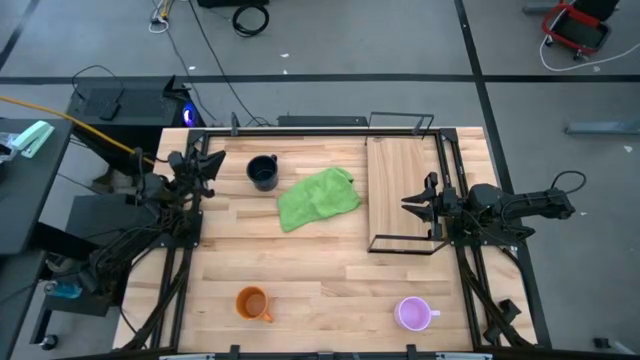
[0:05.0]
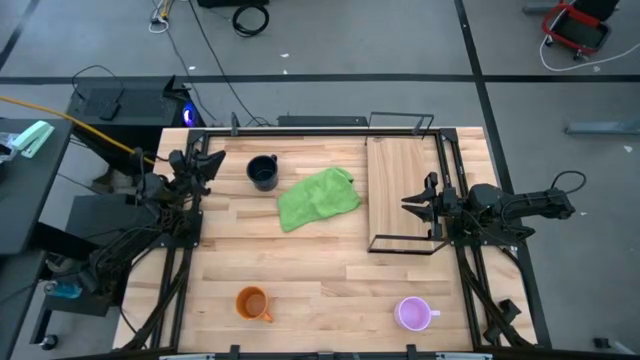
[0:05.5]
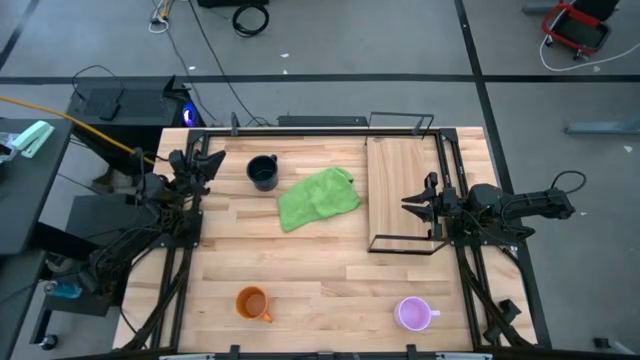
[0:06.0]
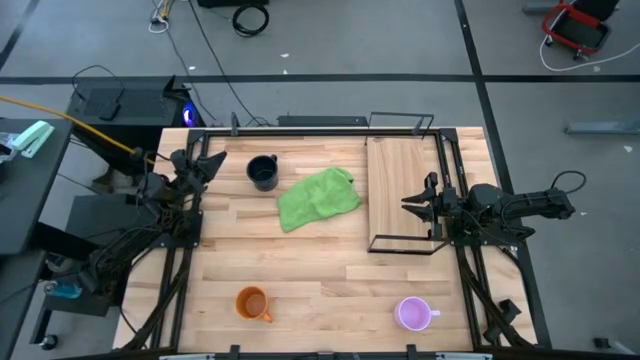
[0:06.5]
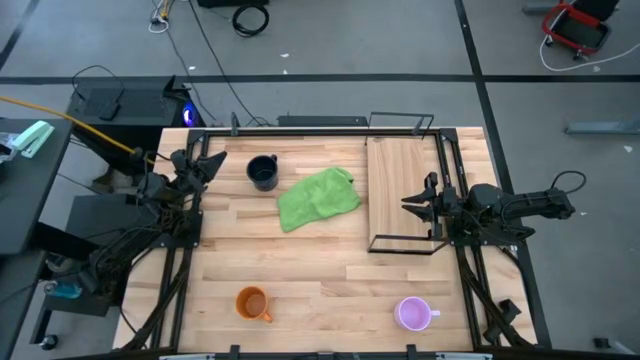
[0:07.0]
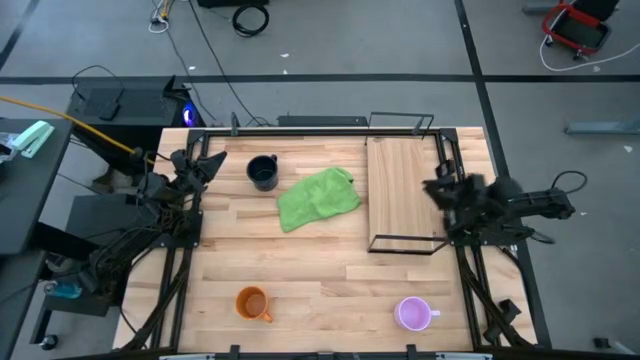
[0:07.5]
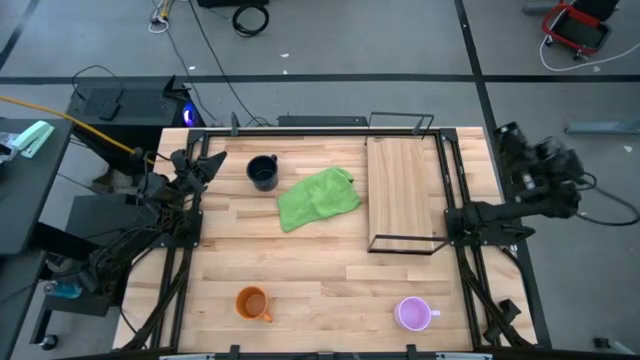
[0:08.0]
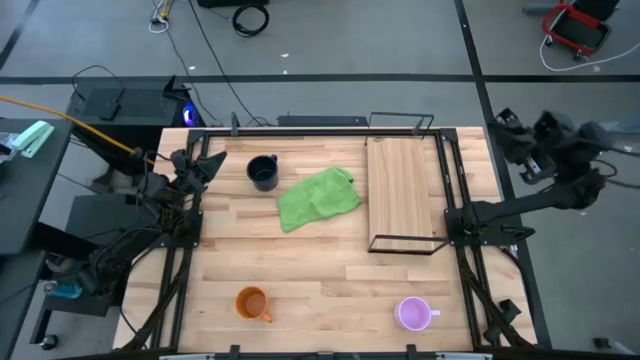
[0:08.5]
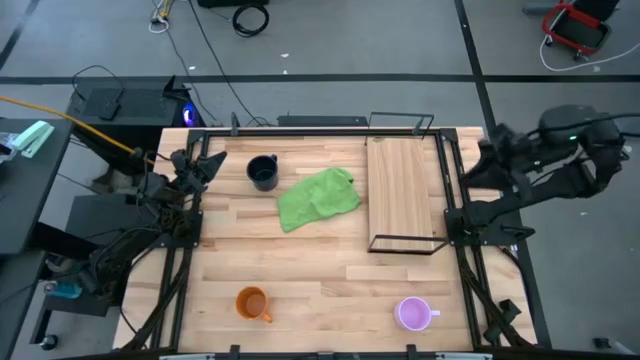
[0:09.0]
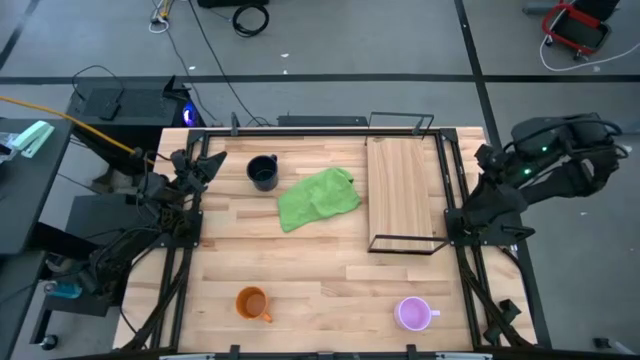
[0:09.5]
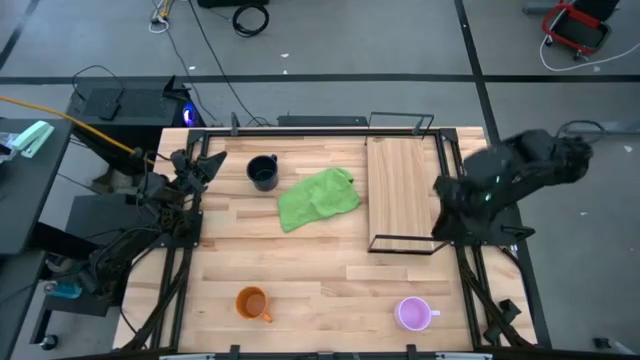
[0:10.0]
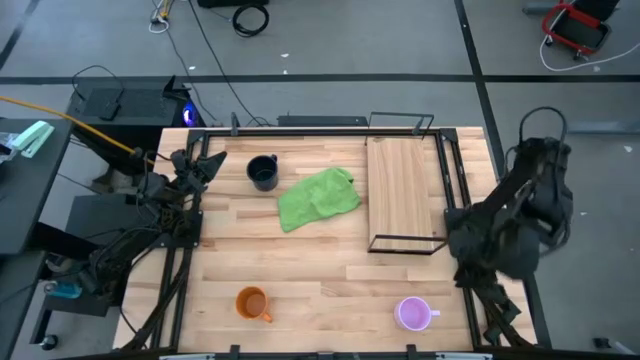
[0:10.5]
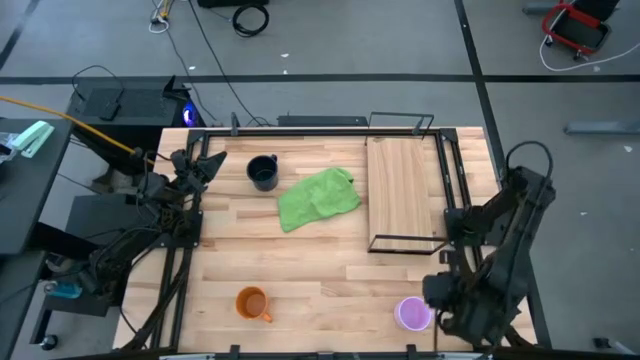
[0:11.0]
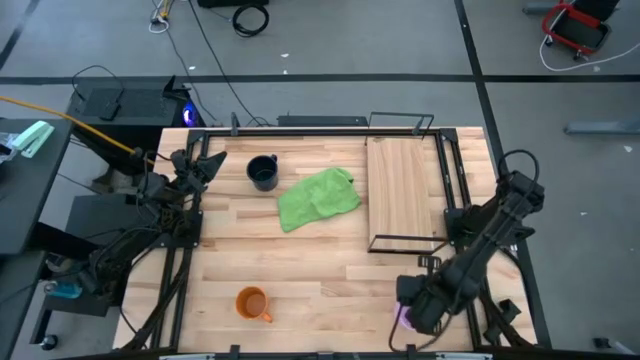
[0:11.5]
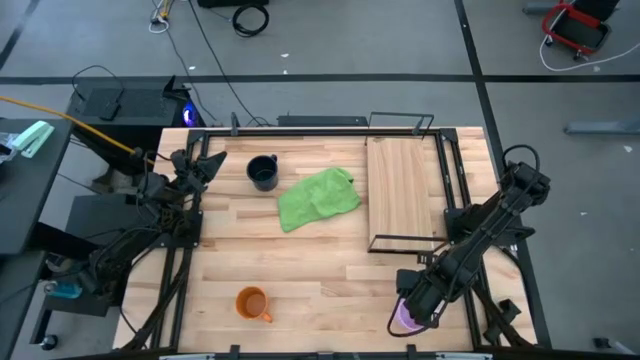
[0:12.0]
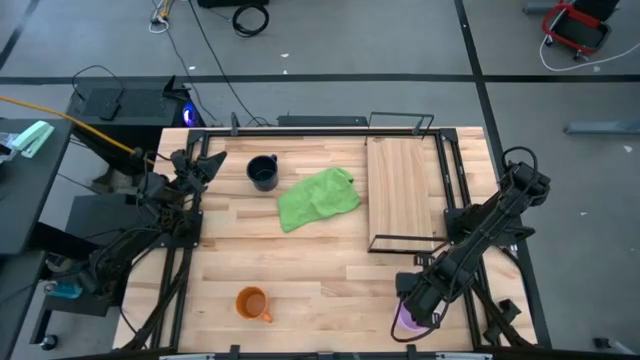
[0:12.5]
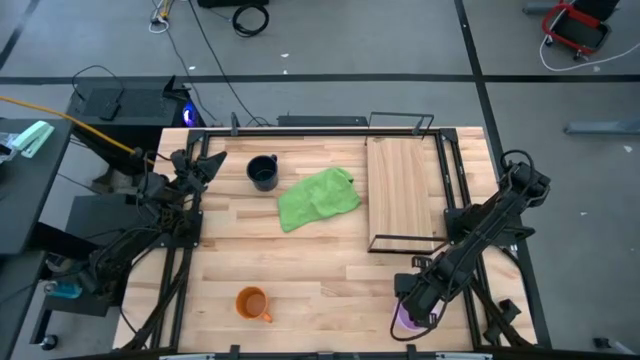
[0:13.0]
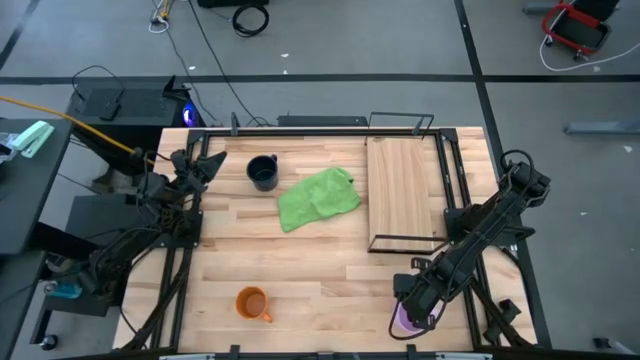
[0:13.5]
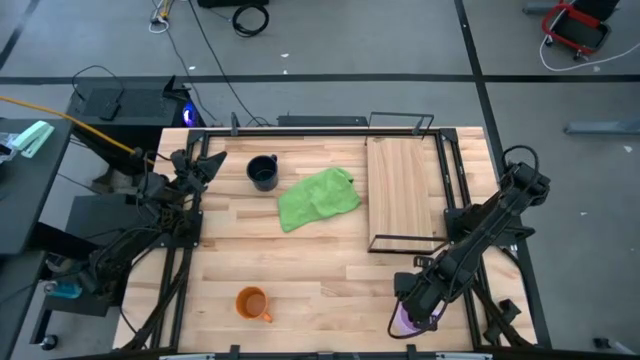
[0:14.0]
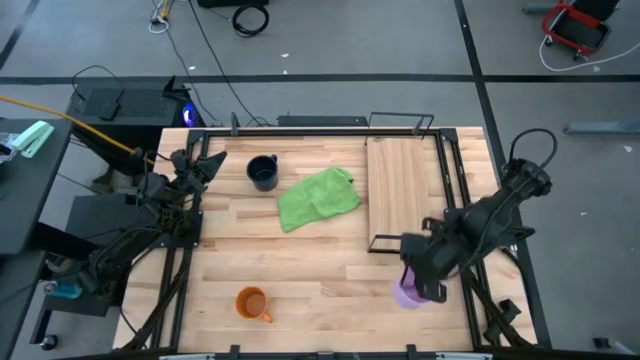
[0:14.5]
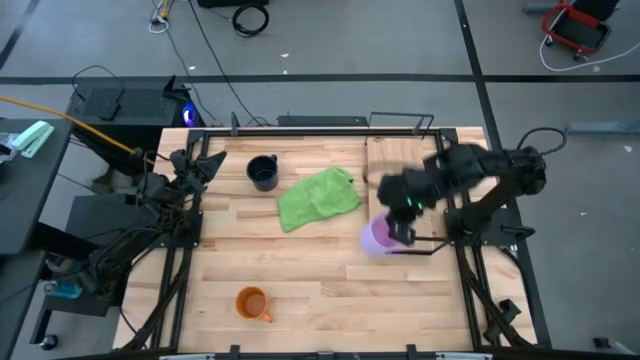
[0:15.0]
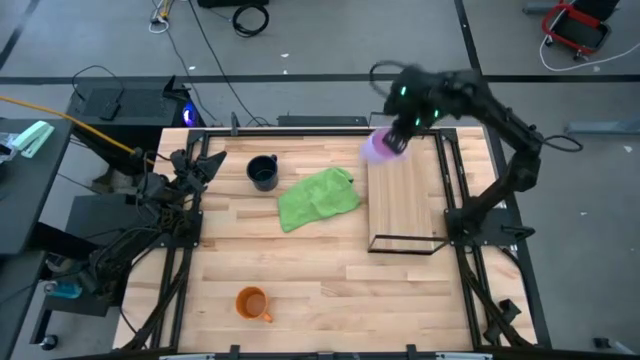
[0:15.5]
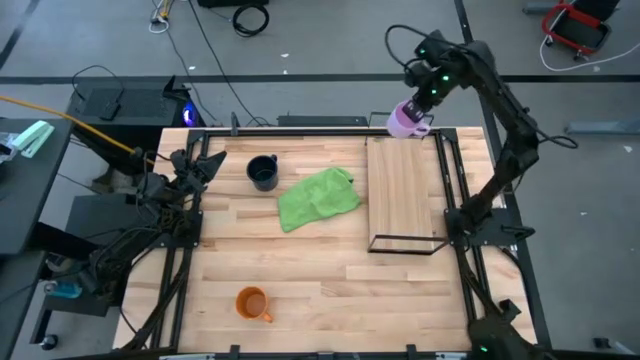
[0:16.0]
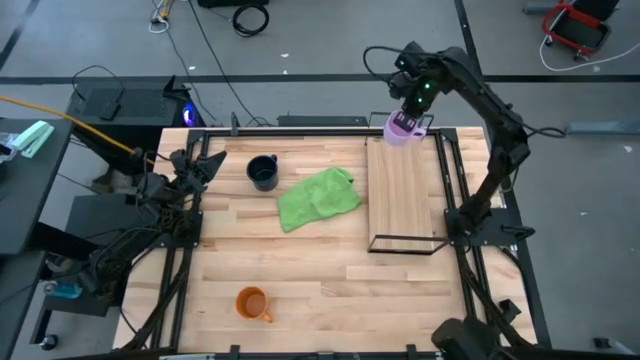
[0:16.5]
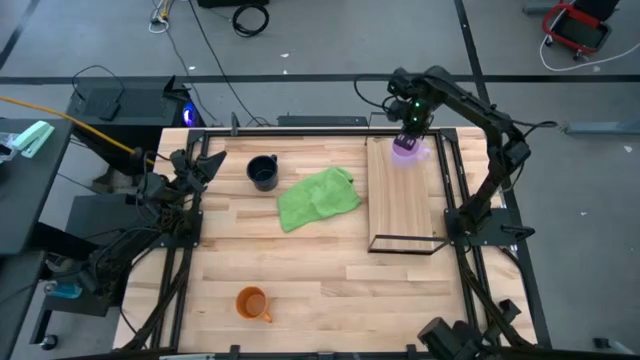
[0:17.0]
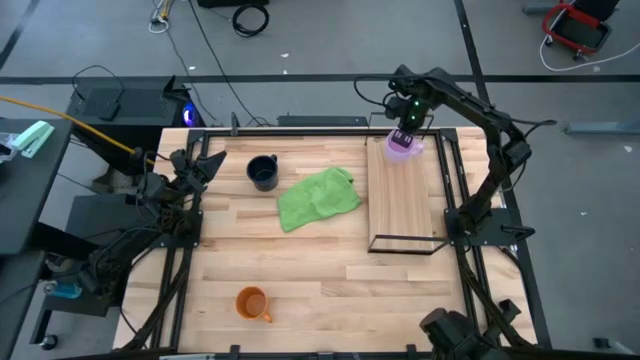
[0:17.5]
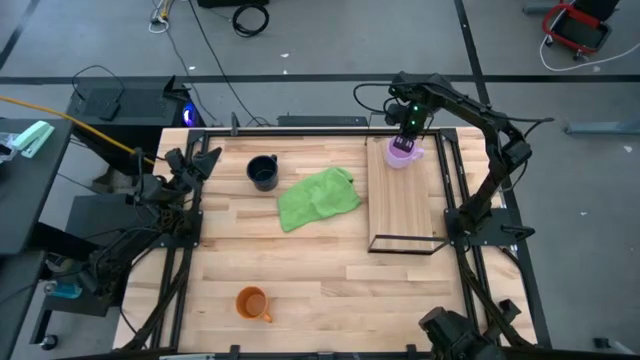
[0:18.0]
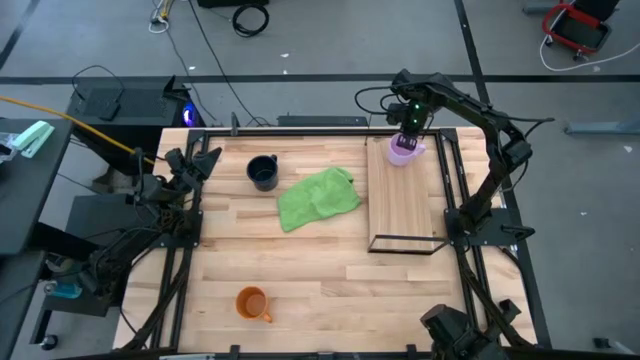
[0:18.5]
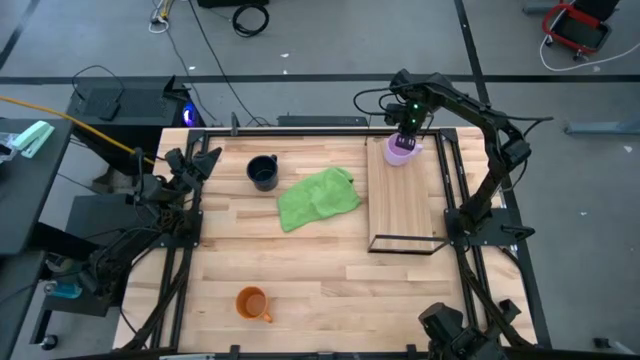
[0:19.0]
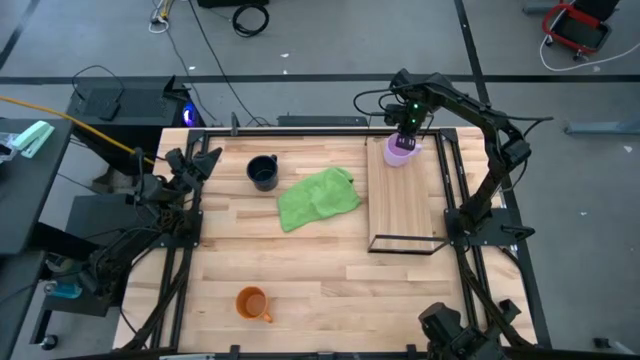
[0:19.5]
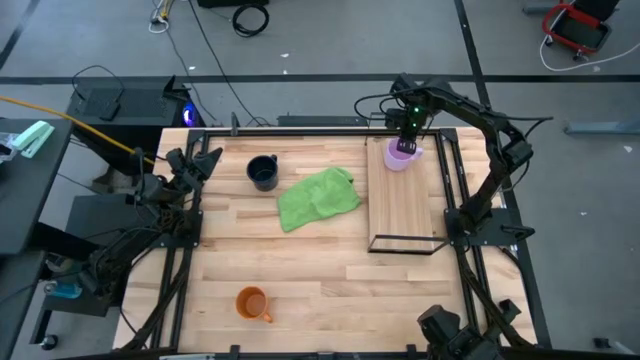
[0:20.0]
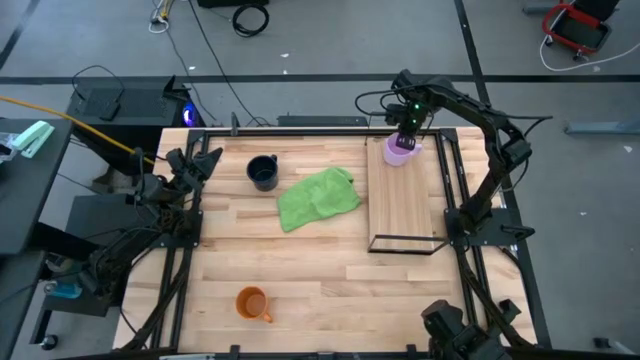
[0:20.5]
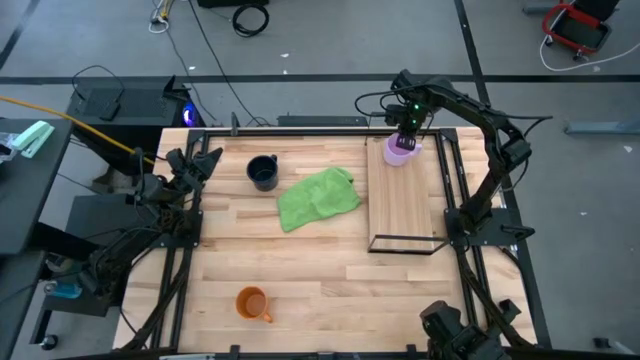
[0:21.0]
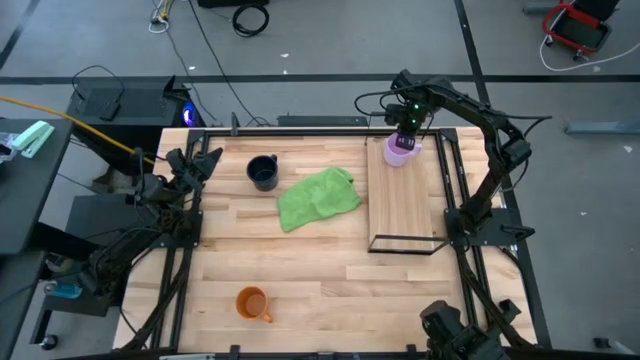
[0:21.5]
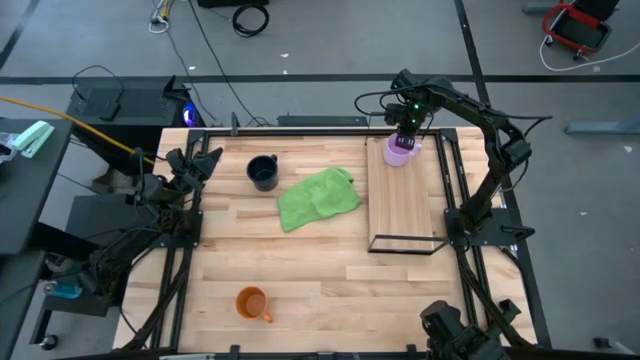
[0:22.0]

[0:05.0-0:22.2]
Task: Stack small to large cups/mugs on shelf
Put the pink mug on the shelf

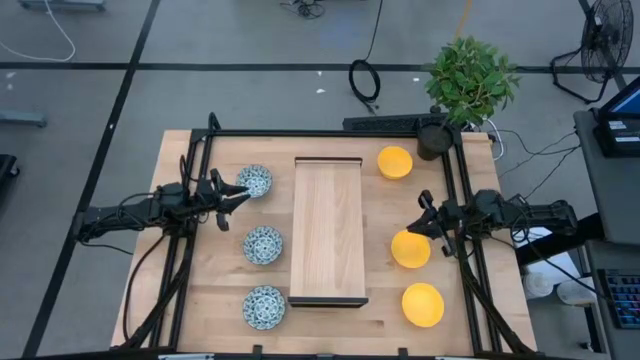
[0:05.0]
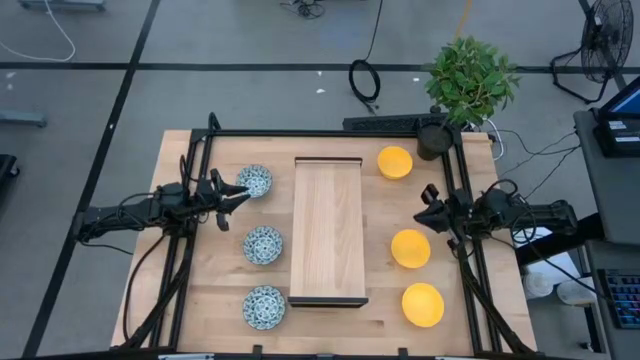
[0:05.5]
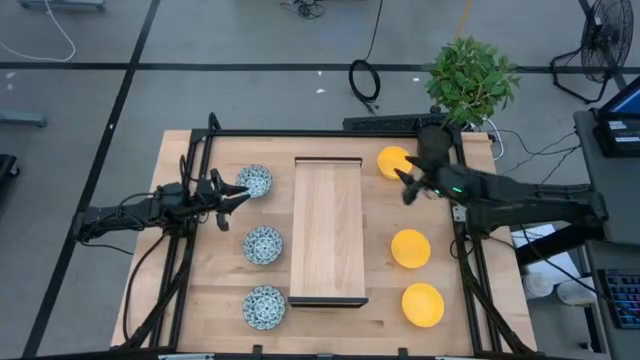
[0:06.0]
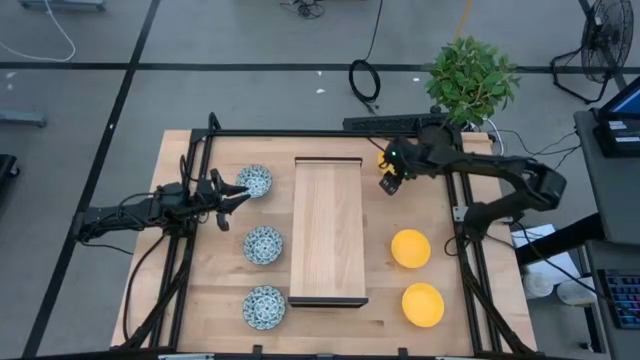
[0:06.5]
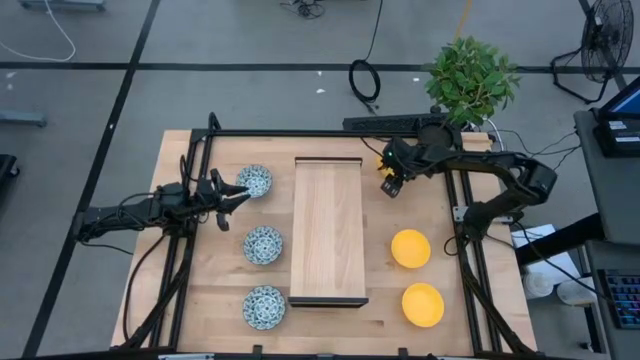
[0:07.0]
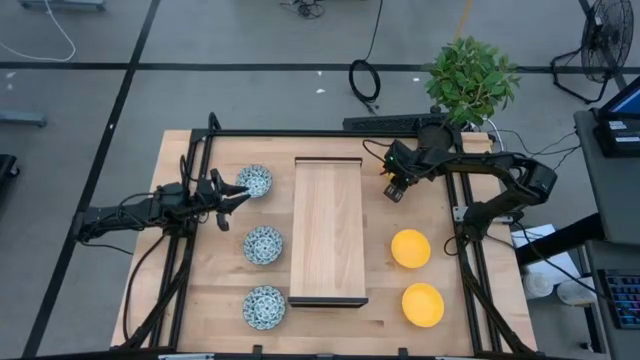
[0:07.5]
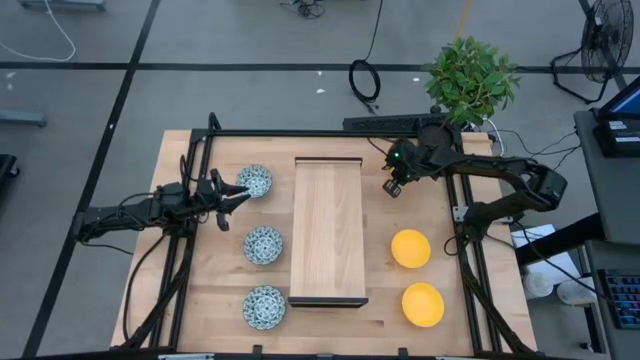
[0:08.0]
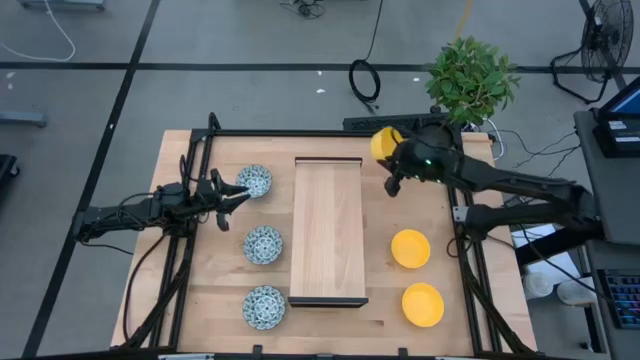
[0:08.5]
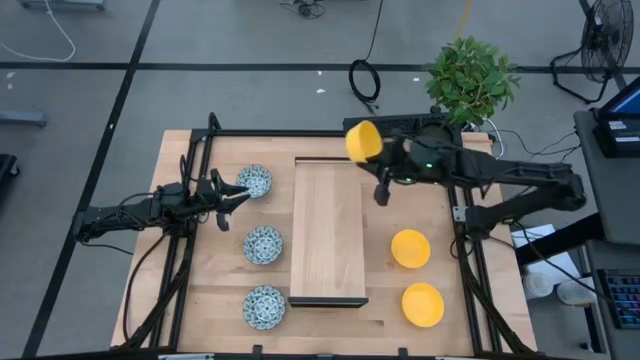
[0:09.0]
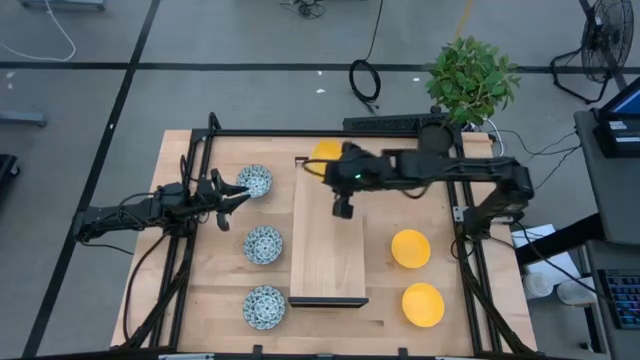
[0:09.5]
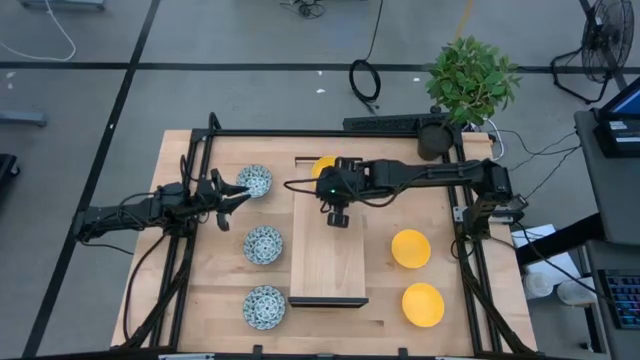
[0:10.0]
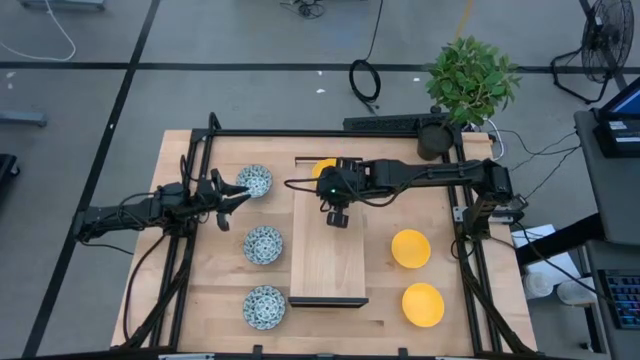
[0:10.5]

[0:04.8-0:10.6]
Task: Pick & Place Mini bowls
Put the top yellow bowl on the shelf
